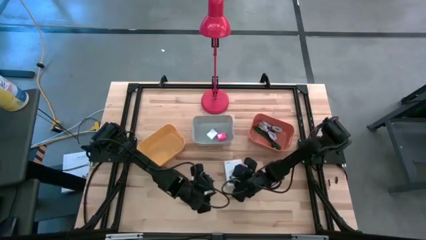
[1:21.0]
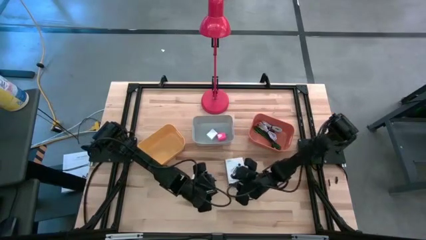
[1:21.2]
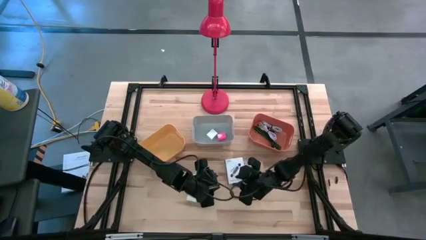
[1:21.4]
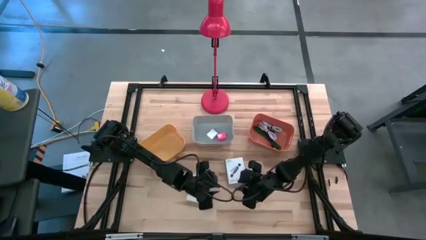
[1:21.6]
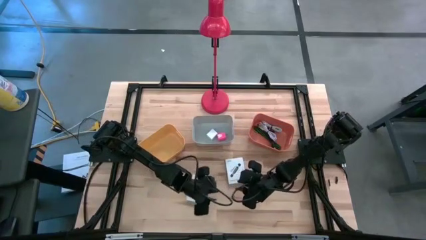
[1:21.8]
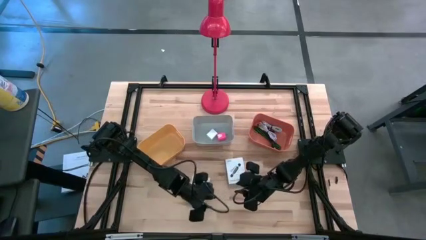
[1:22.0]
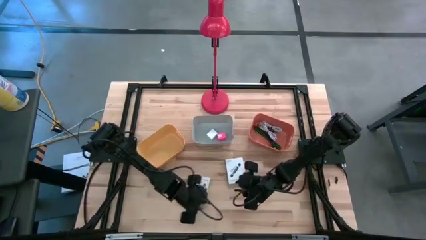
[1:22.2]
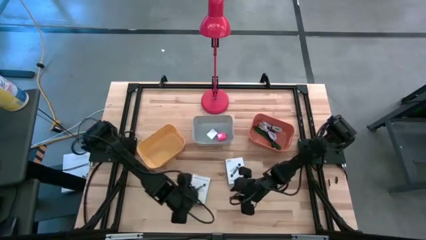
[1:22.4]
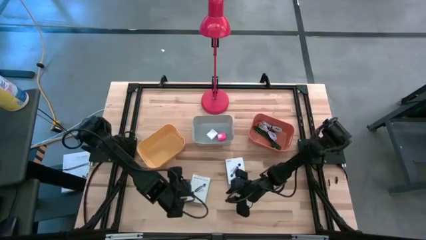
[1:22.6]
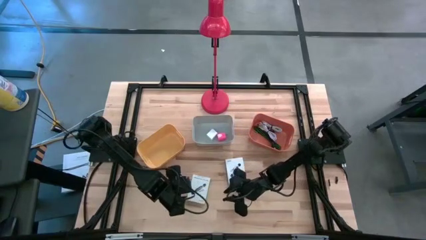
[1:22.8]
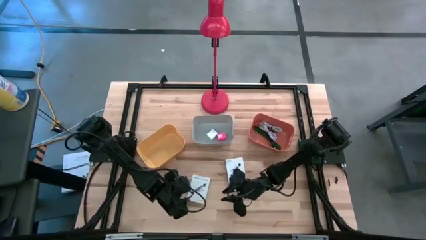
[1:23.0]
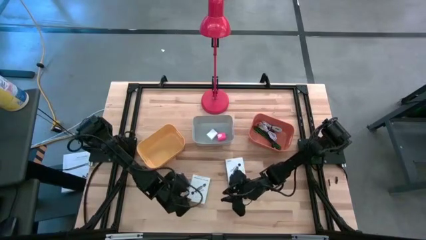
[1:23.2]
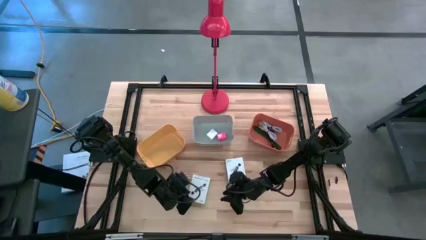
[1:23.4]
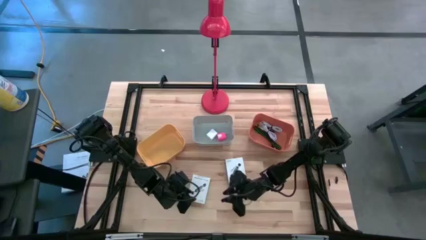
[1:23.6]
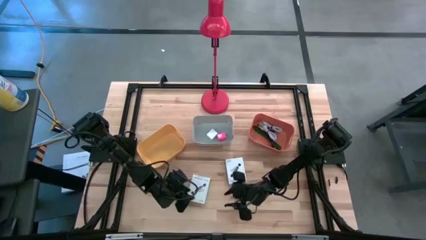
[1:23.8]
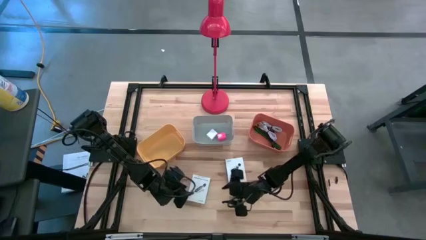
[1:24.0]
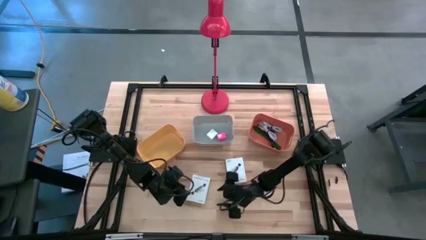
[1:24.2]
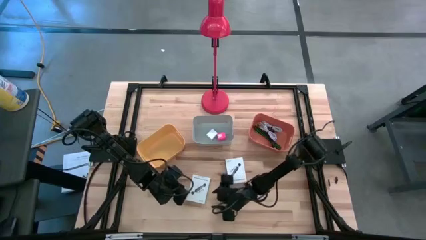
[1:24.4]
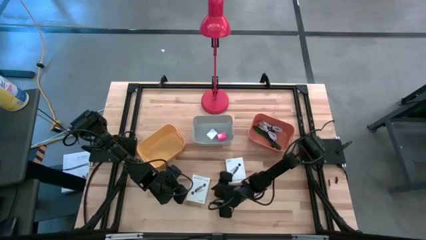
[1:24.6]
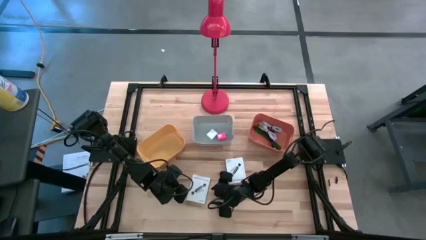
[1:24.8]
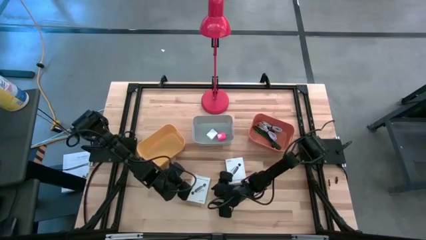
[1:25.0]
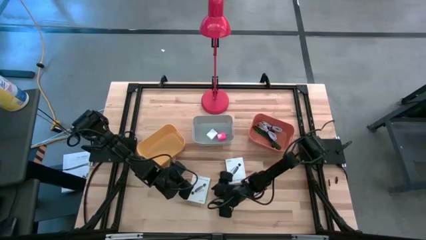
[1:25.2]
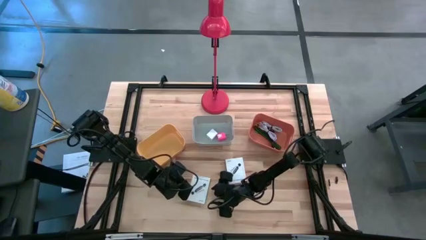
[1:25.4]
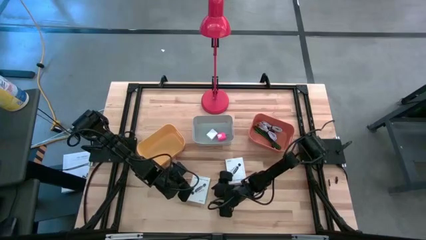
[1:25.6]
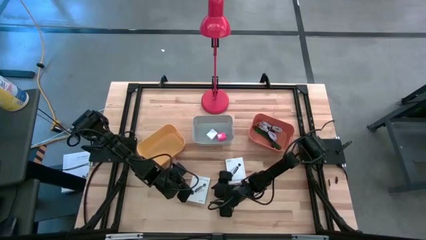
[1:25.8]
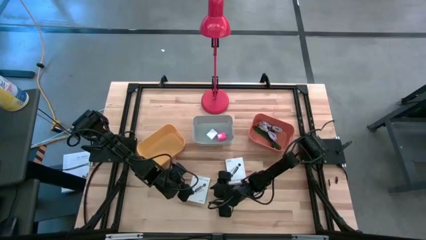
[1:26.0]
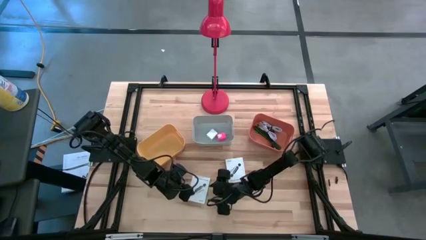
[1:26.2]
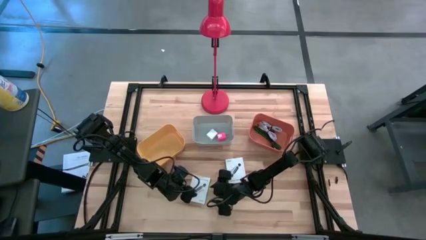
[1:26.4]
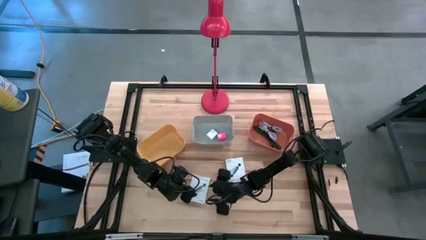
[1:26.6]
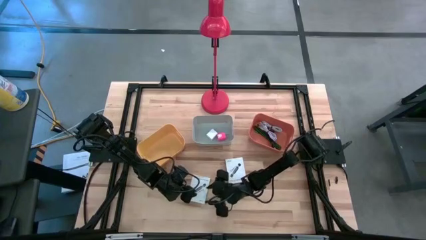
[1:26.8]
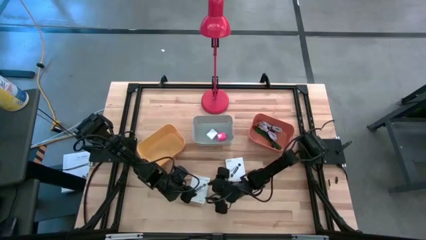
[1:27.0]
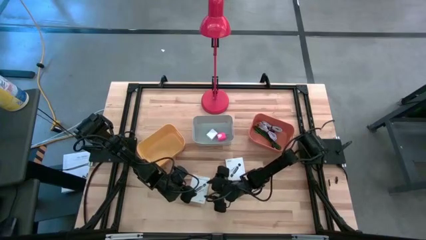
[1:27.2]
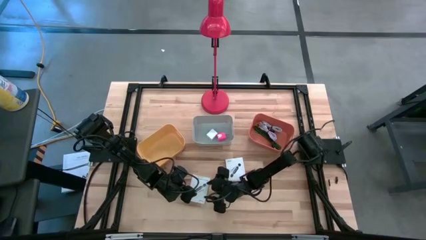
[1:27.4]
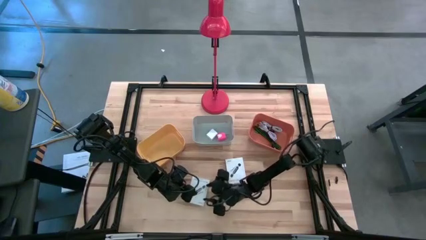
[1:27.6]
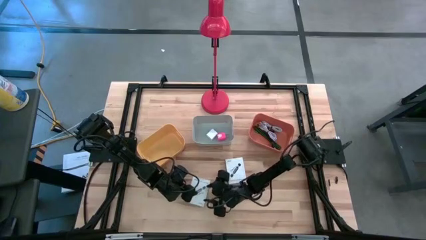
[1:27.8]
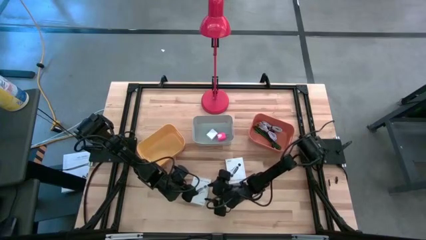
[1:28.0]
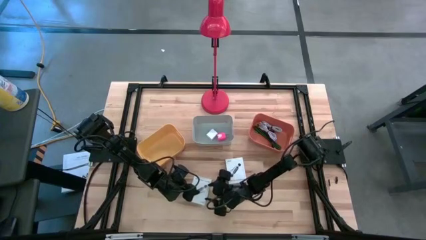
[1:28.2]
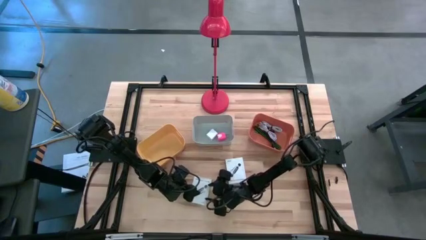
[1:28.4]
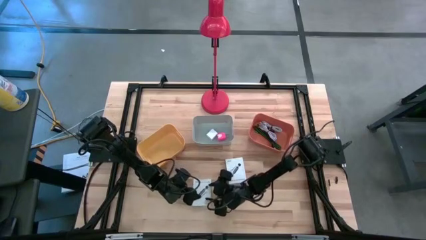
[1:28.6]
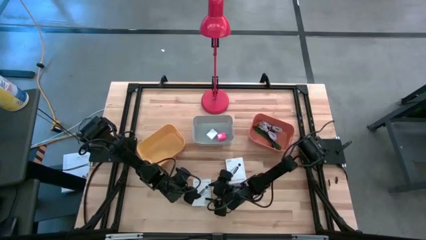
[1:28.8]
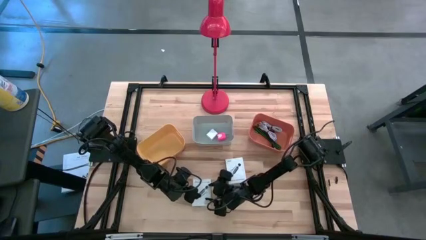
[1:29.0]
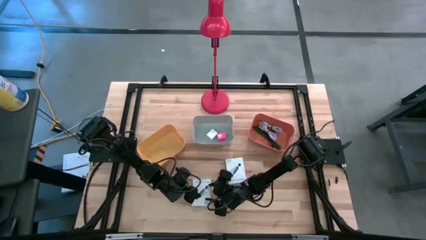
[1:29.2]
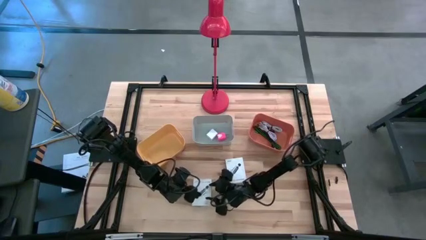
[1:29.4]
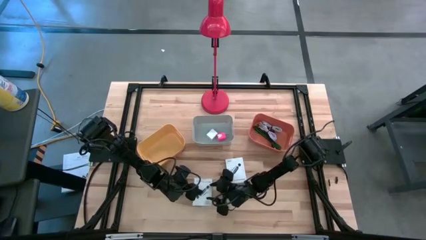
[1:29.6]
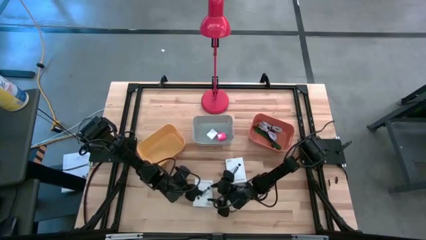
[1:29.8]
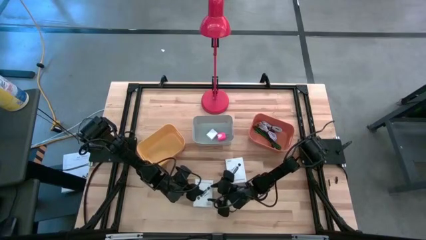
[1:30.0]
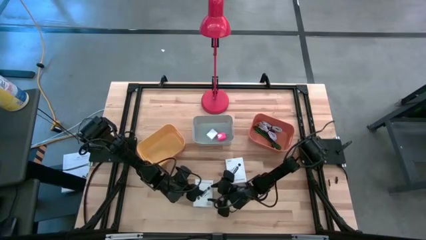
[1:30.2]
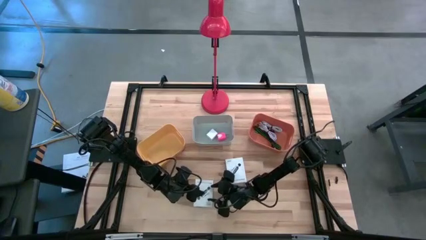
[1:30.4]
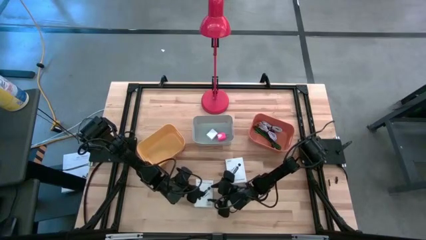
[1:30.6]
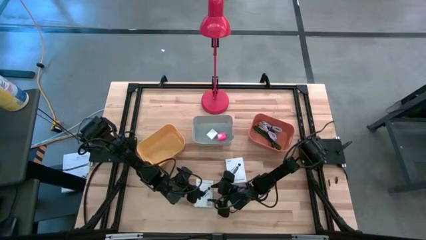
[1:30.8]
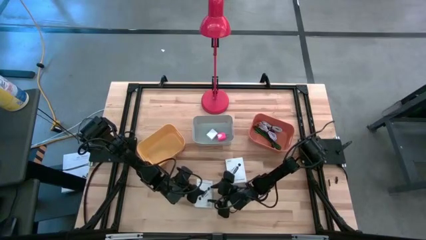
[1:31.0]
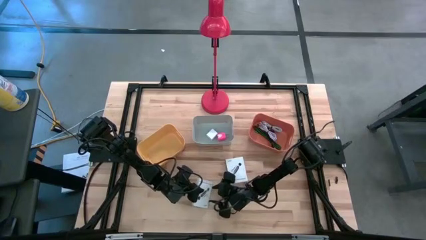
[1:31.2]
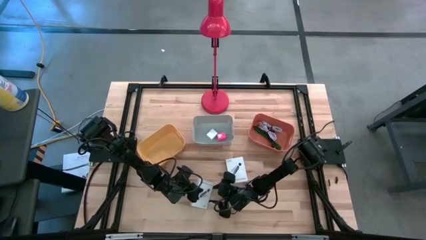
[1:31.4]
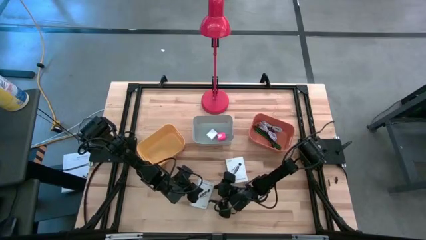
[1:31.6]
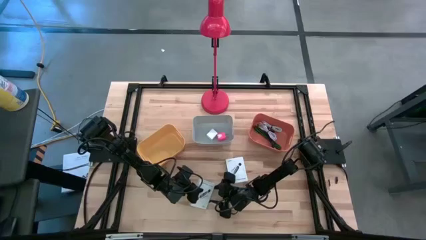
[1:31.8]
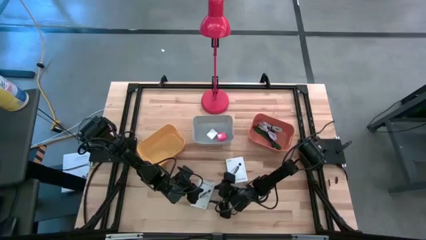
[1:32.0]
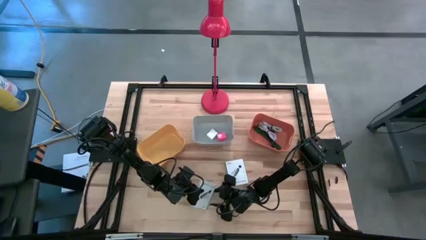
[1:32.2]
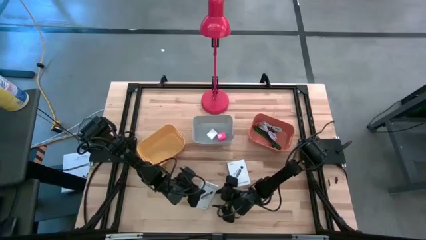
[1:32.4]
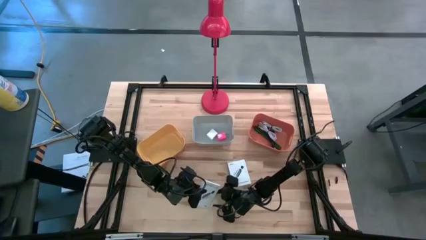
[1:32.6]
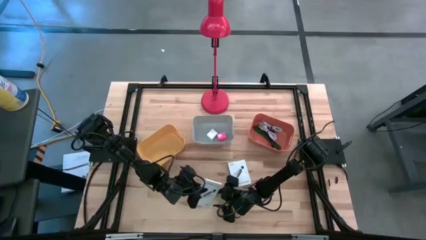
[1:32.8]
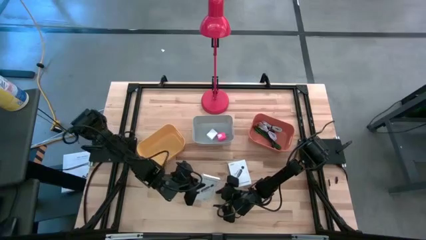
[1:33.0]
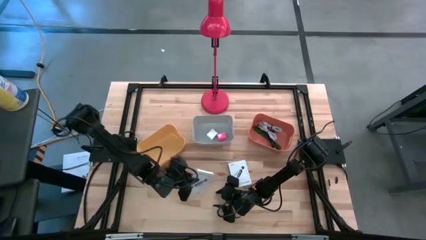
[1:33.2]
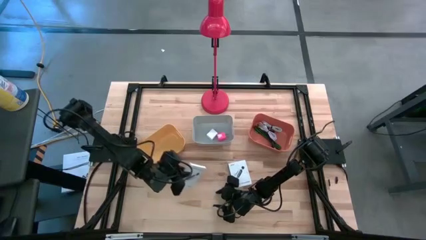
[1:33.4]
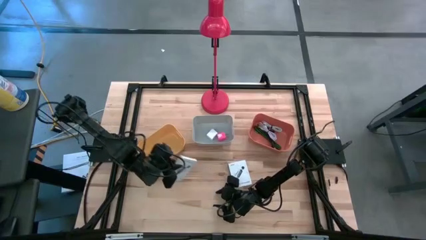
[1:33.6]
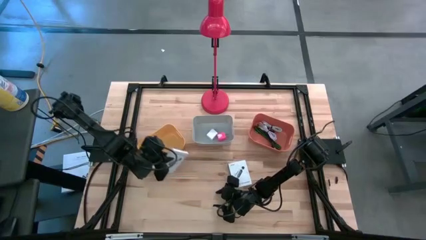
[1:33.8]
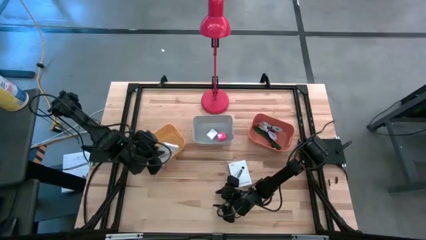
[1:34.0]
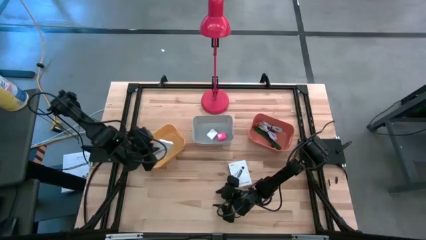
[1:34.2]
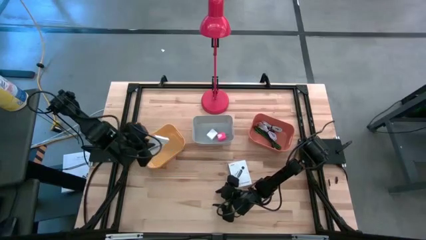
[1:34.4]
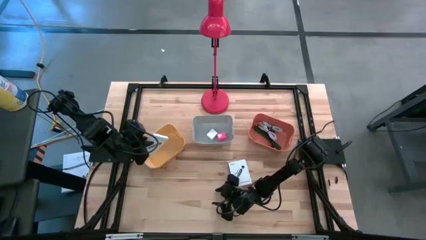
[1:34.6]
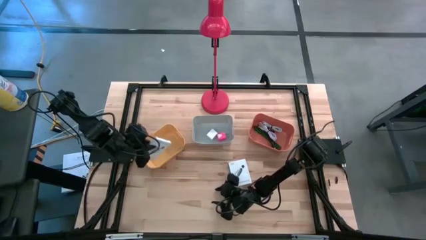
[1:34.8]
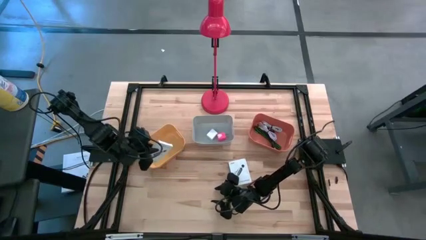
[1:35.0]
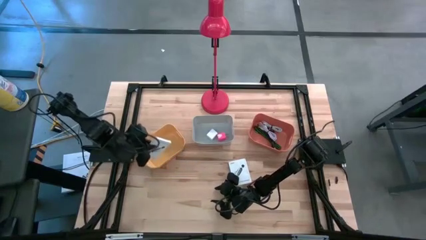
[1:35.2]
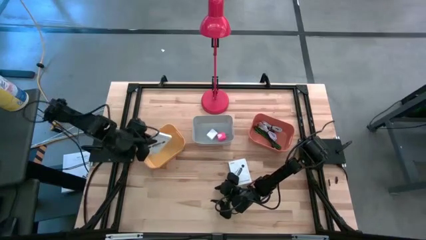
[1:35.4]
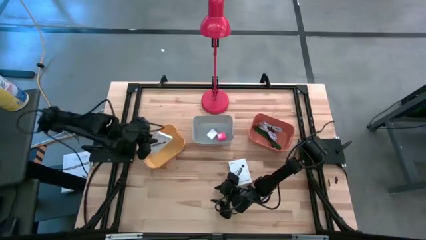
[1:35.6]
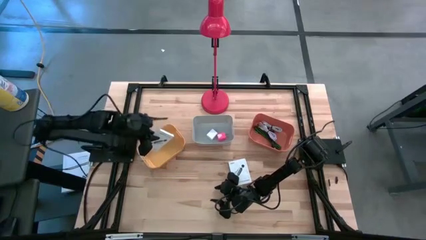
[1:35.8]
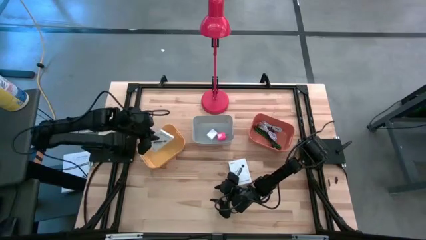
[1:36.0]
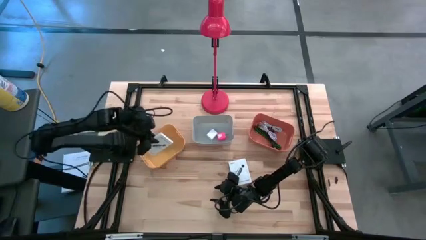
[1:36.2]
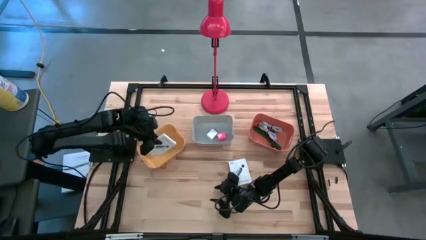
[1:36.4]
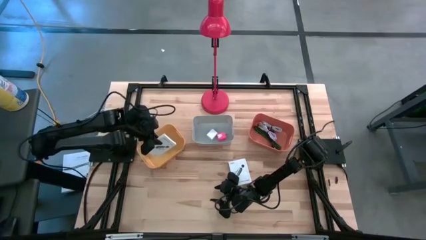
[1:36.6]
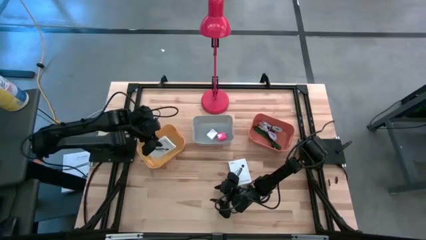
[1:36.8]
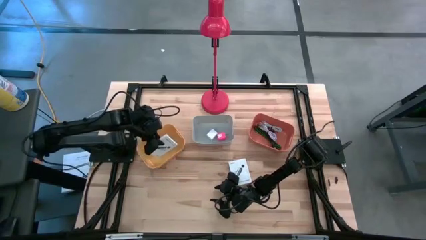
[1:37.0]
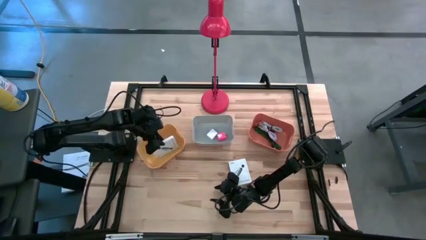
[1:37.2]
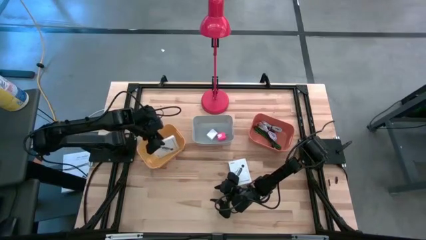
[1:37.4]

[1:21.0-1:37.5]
Task: Pick and place items into bin
Put the left white card reader box into the yellow bin
